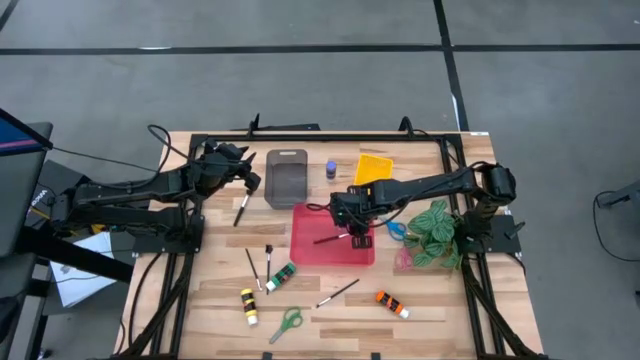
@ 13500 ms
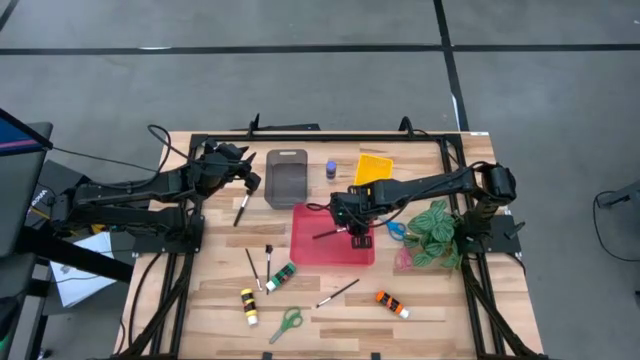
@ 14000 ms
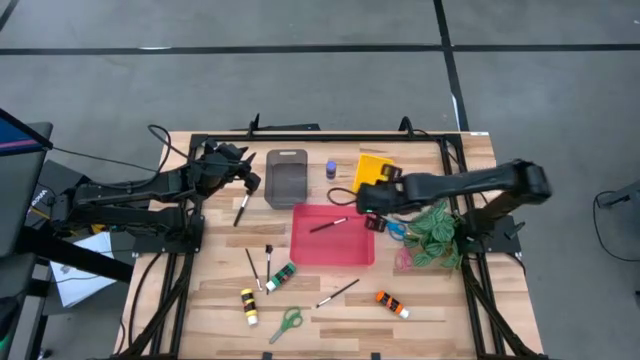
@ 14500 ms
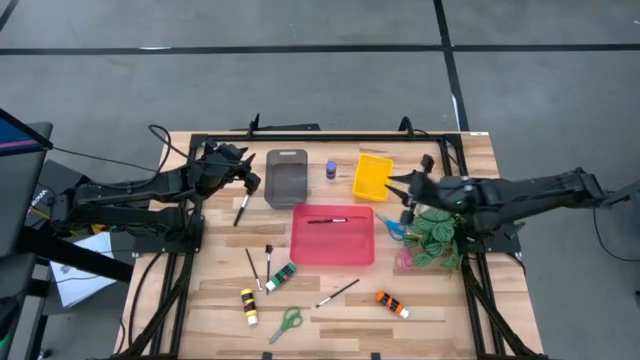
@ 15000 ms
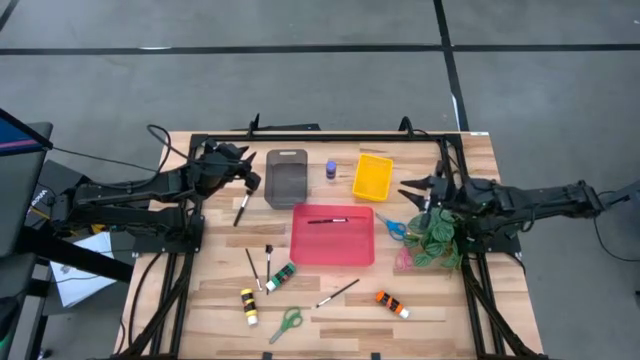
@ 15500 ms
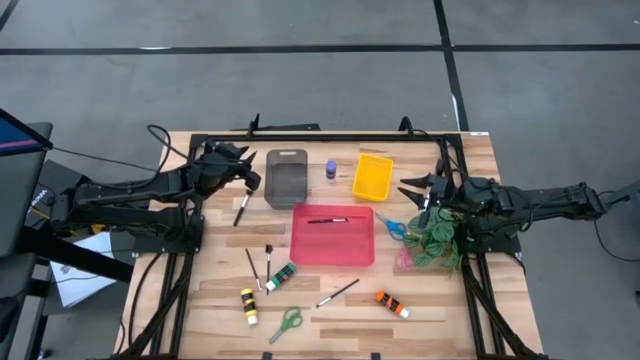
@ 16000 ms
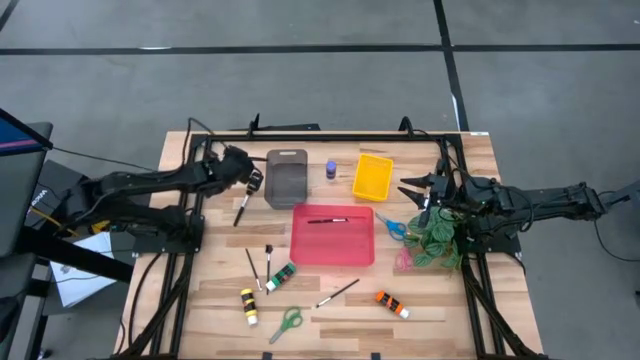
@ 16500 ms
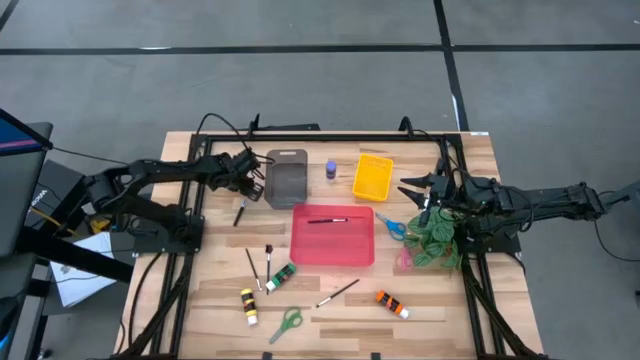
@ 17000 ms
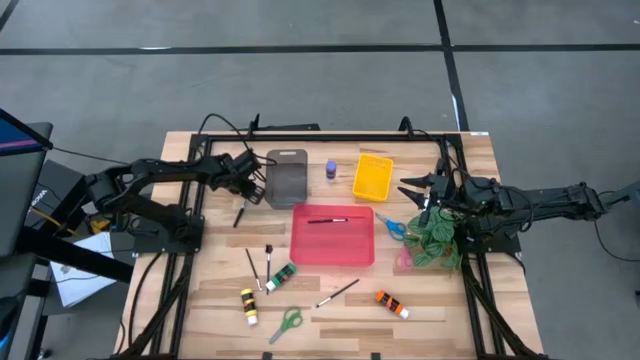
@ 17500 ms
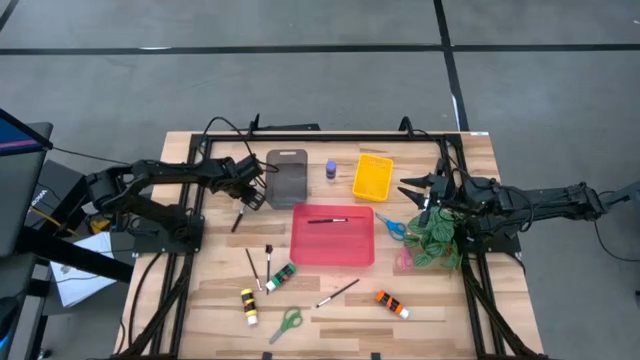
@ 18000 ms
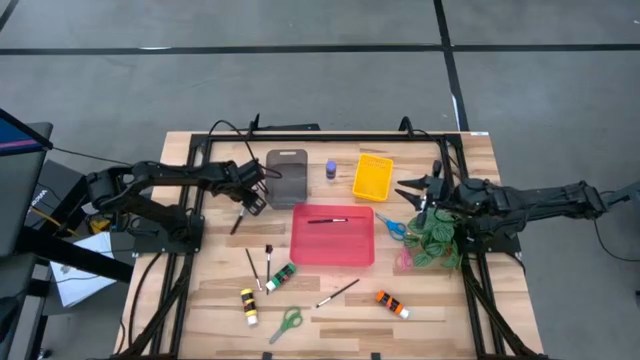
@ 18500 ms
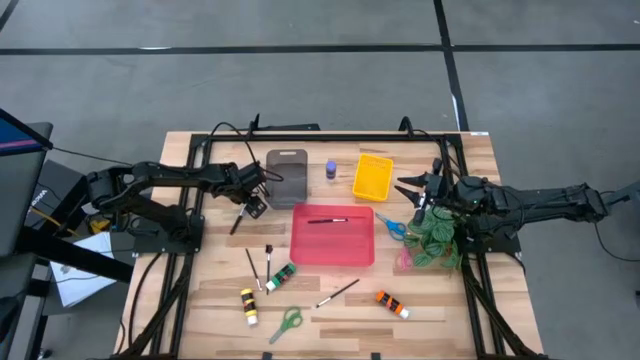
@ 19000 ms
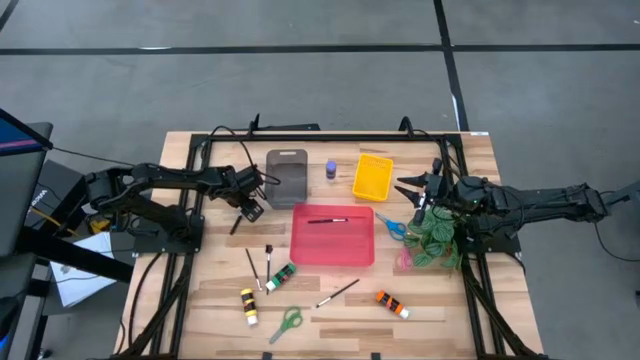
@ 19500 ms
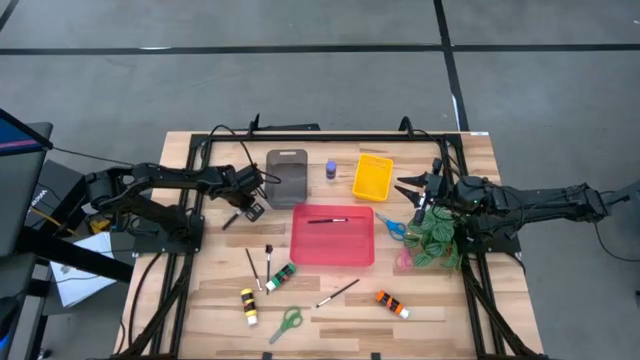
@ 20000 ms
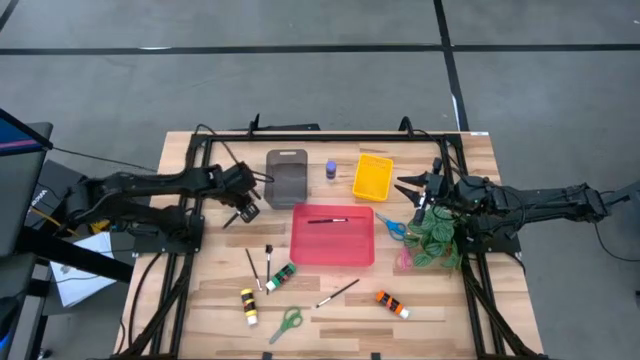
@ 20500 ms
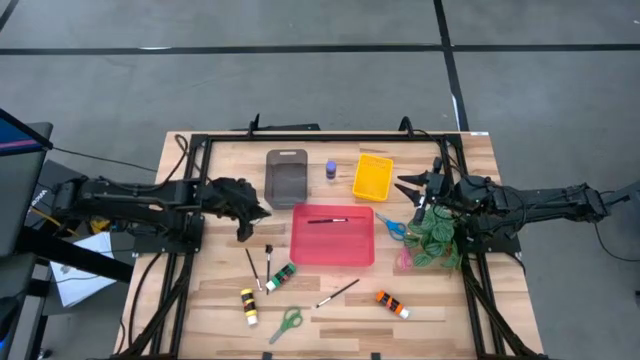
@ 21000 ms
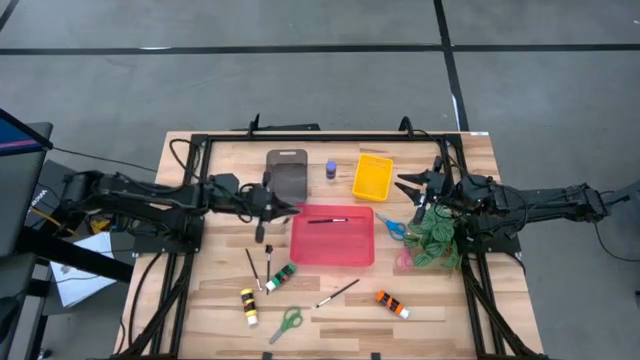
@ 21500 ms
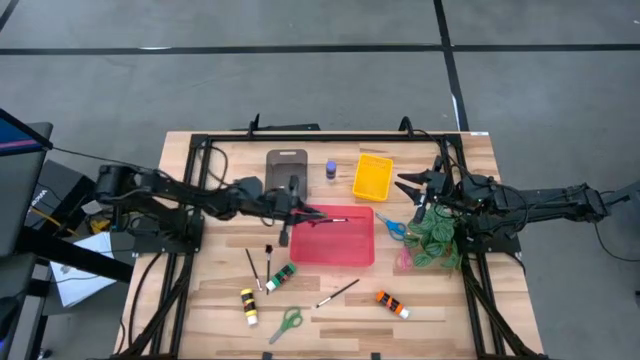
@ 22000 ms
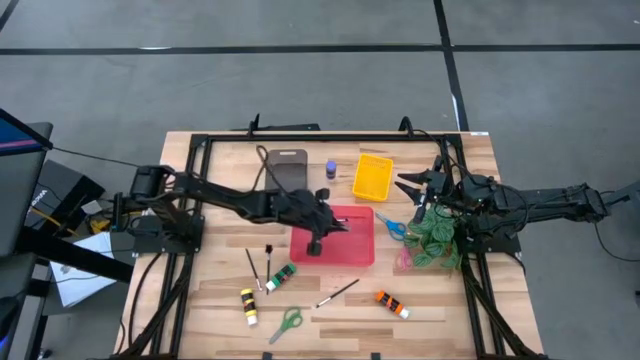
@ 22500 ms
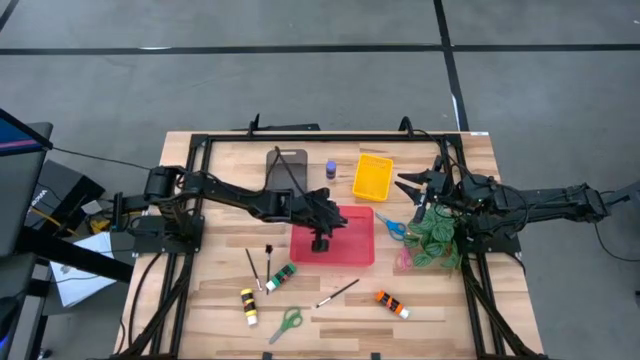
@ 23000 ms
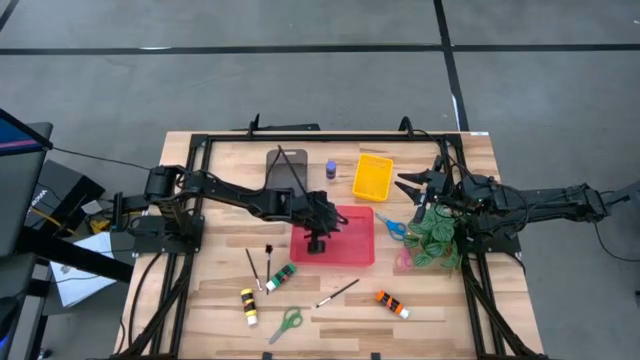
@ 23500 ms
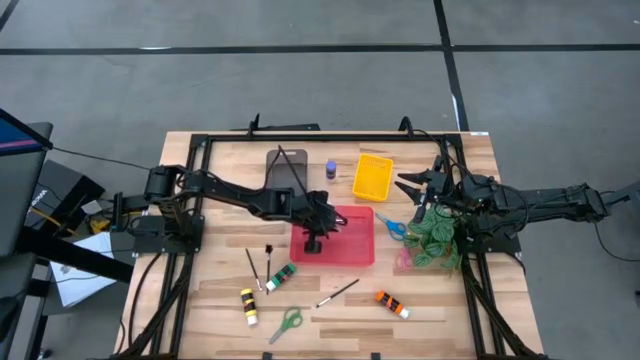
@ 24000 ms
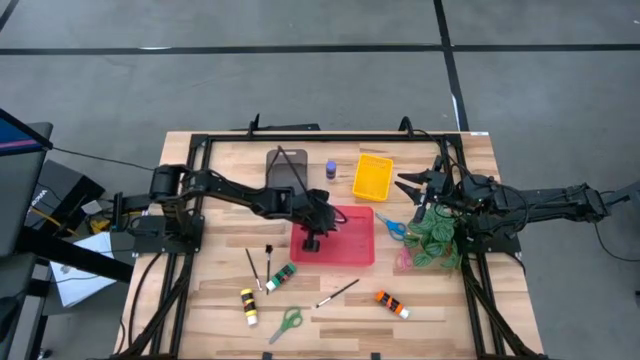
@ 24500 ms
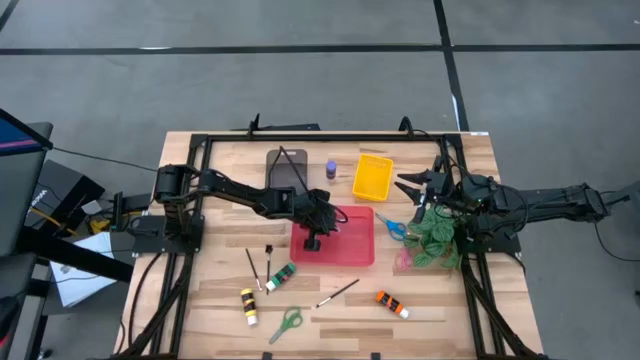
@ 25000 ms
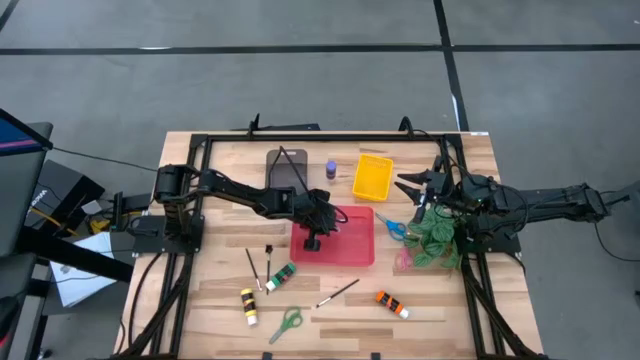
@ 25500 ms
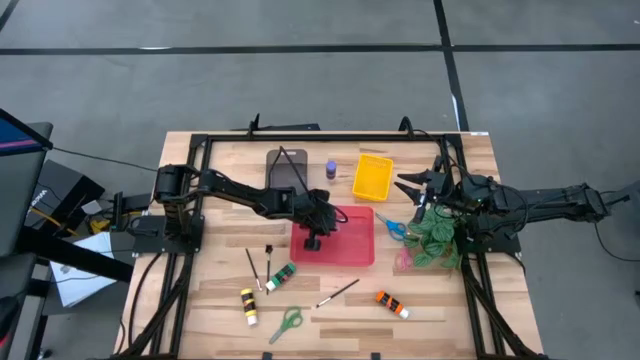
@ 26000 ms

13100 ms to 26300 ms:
Task: Pick & Place Paint Supplies
Put the black makeup brush into the red bin

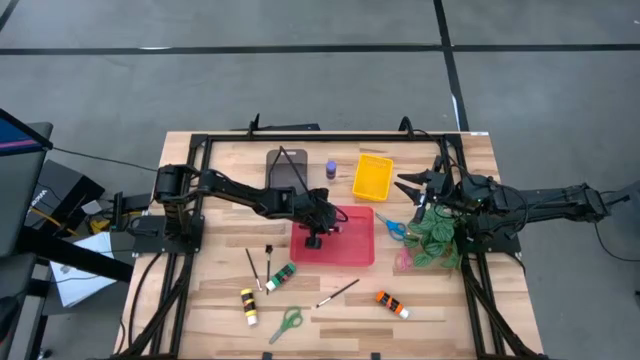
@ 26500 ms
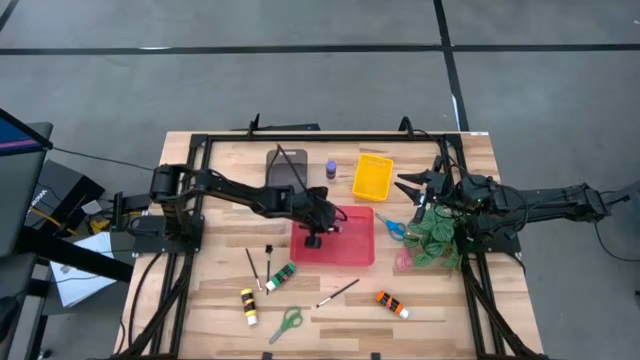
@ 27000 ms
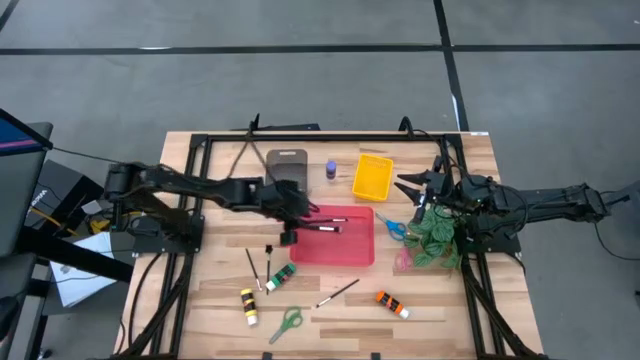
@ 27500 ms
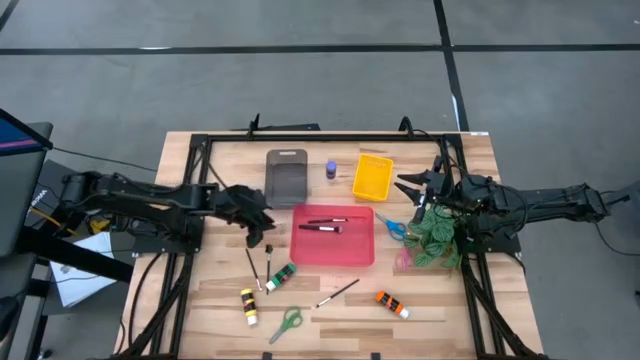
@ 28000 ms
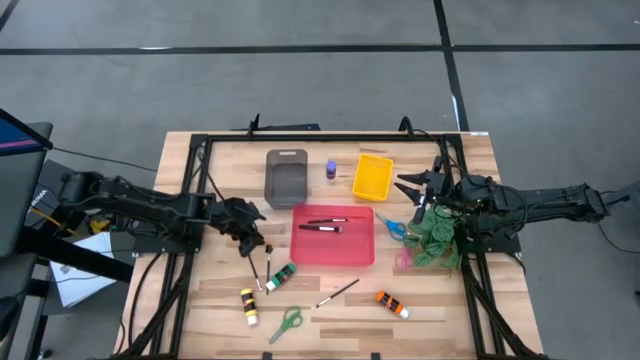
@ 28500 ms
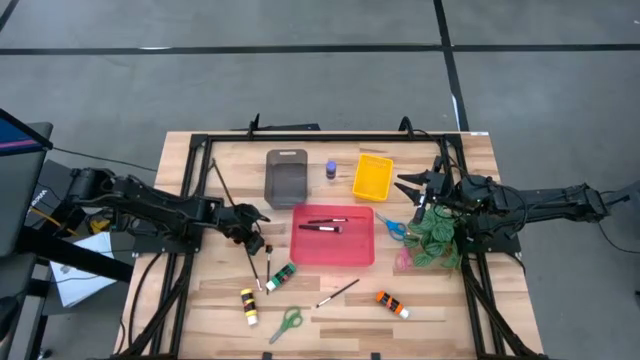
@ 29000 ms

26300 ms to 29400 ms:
Put the black makeup brush into the red bin

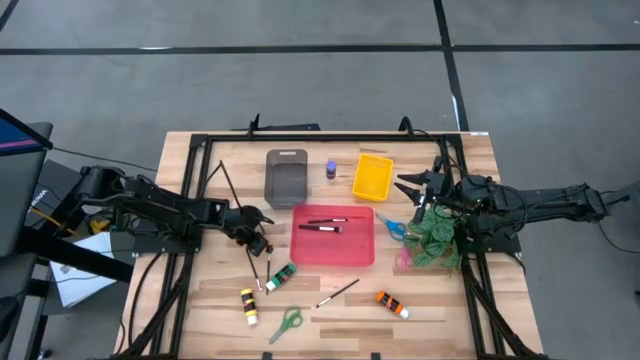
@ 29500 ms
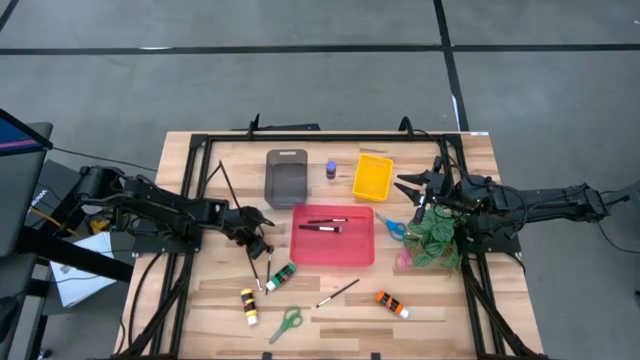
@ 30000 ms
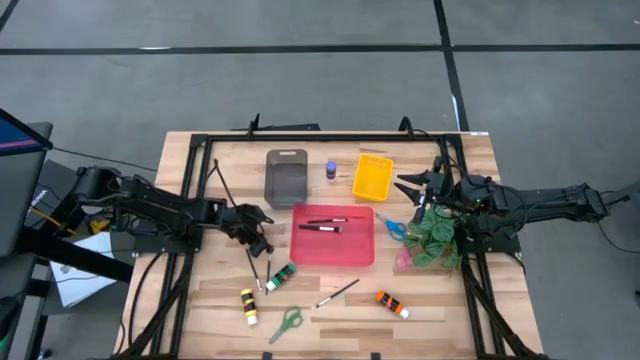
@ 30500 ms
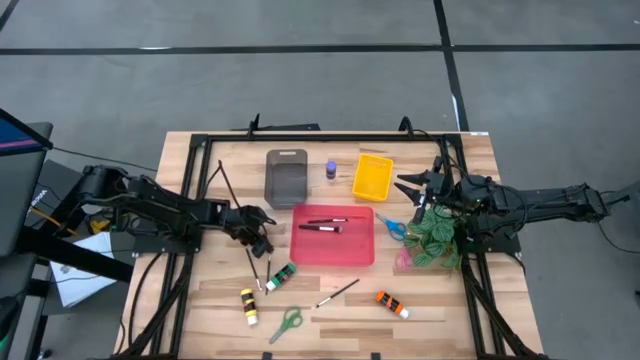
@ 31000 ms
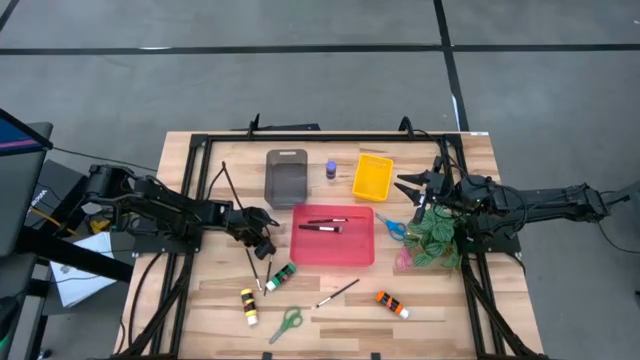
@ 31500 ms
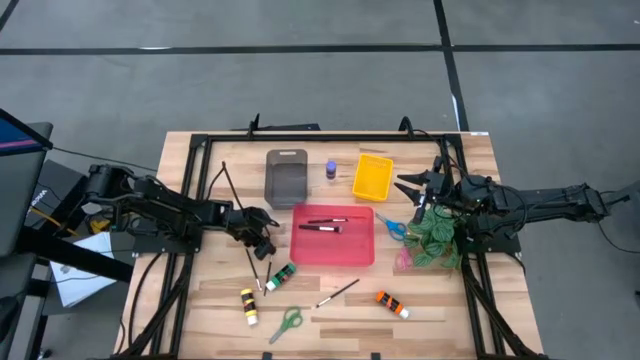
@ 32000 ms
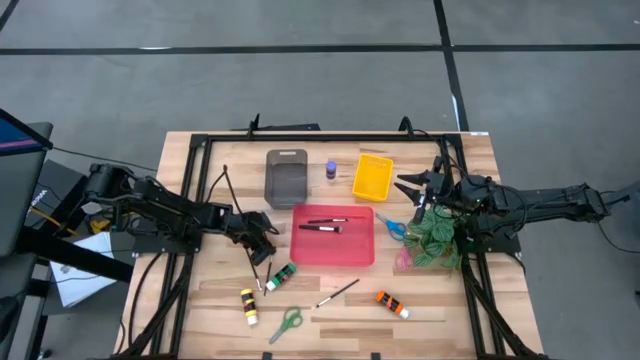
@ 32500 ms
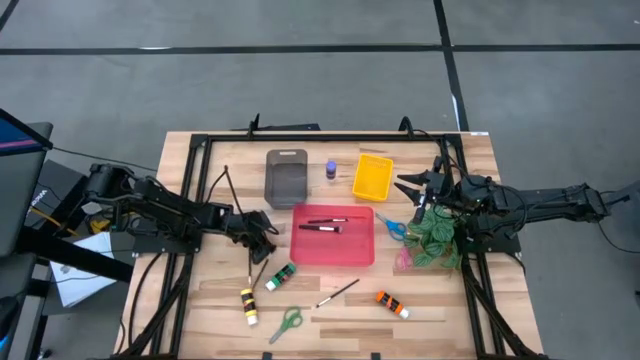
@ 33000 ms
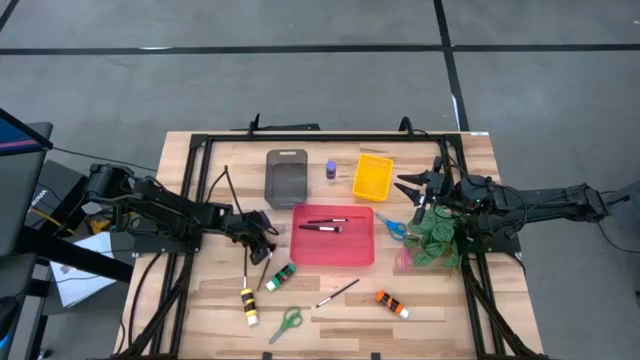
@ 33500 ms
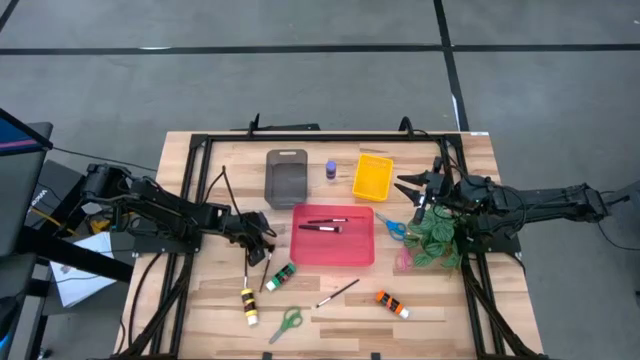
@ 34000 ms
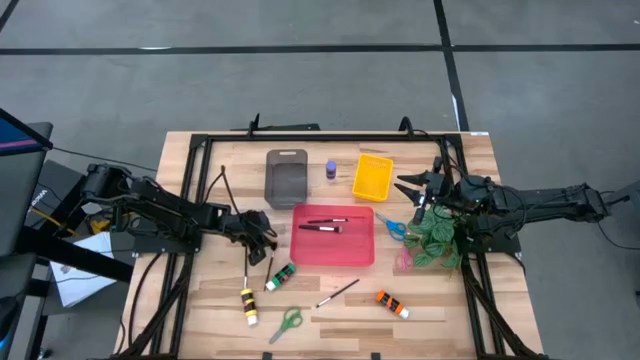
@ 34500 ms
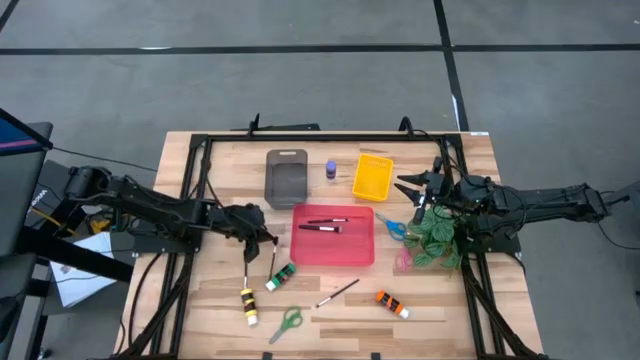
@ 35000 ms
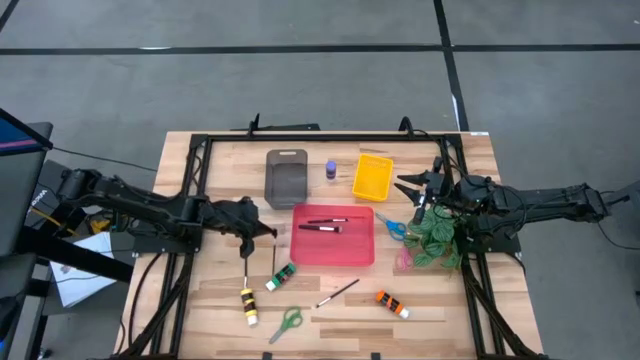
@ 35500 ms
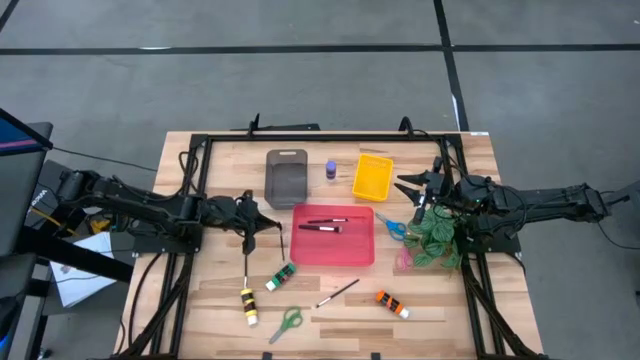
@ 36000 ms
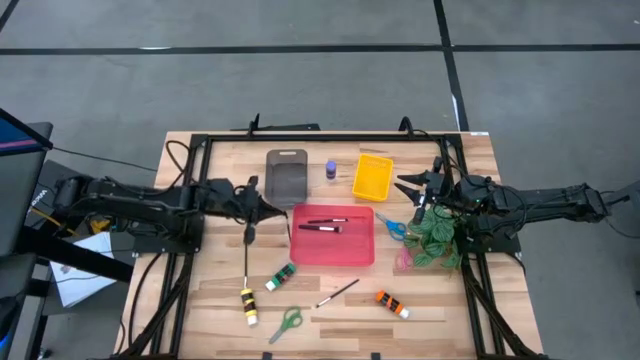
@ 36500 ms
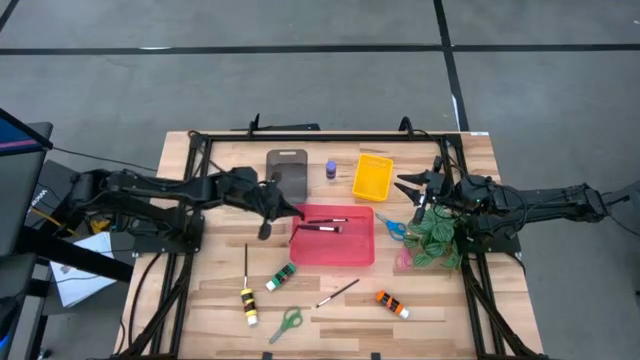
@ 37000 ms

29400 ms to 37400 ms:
Put the black makeup brush into the red bin
